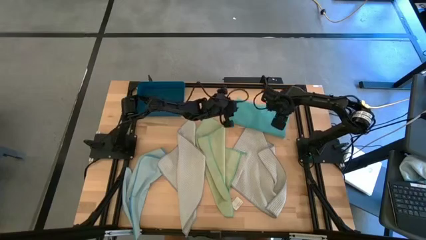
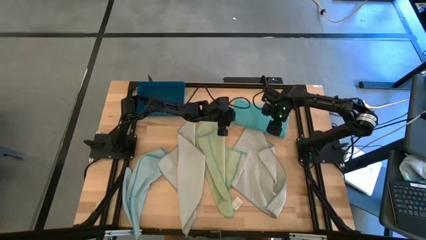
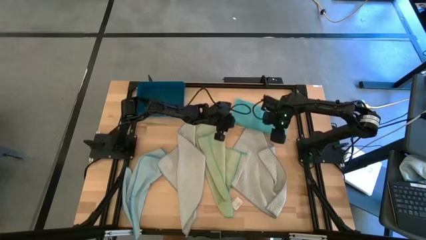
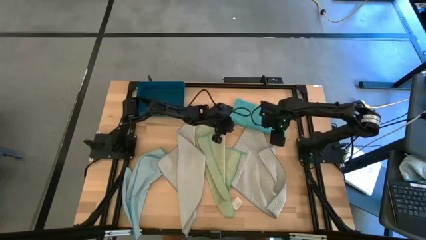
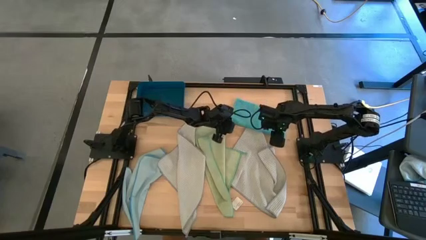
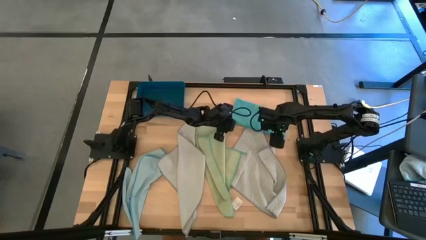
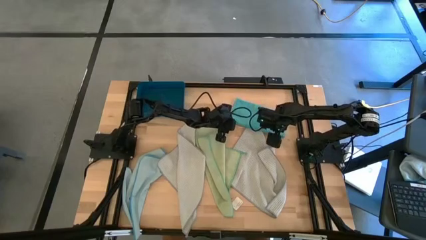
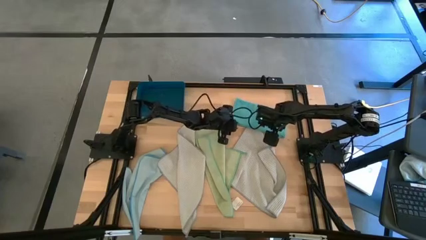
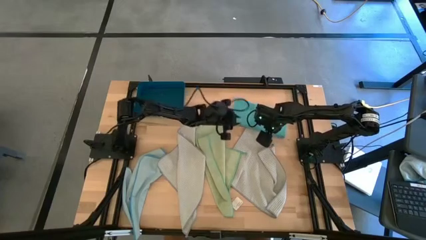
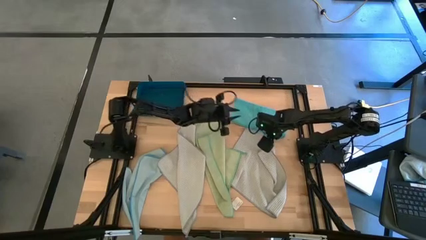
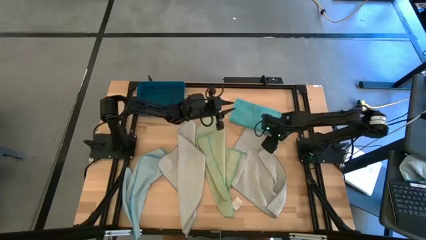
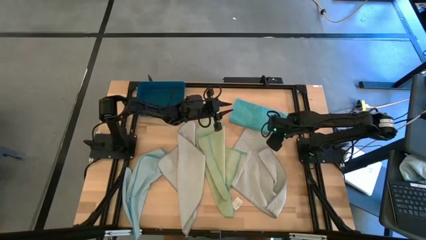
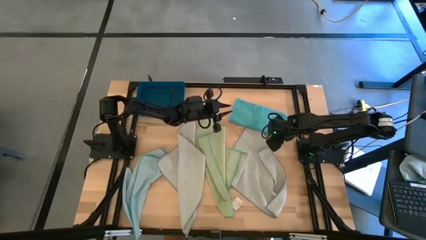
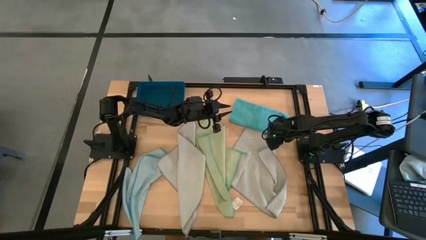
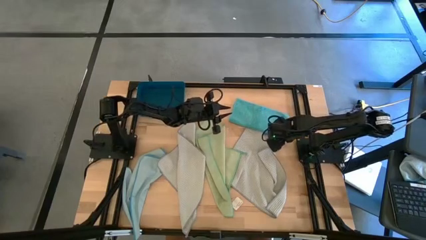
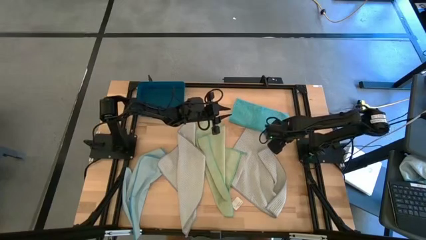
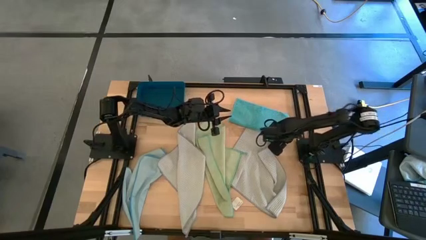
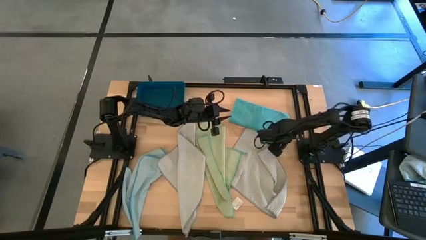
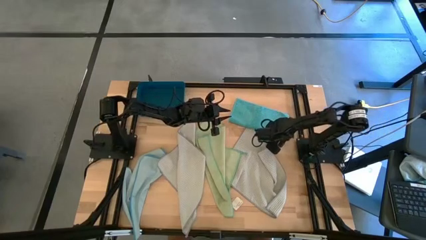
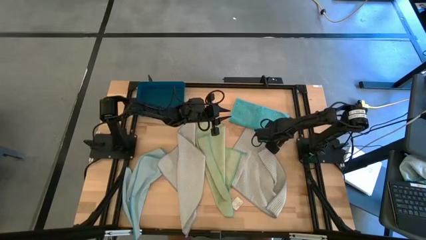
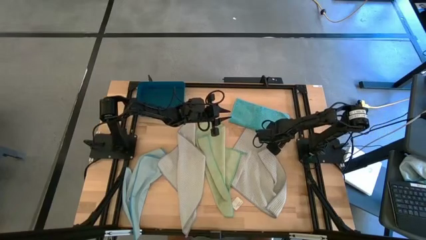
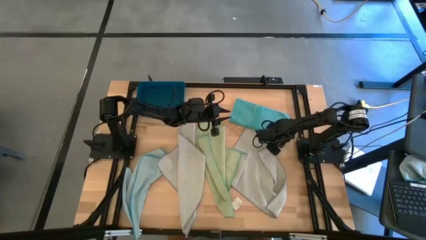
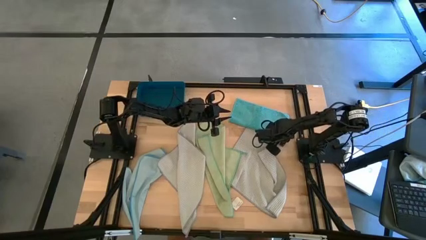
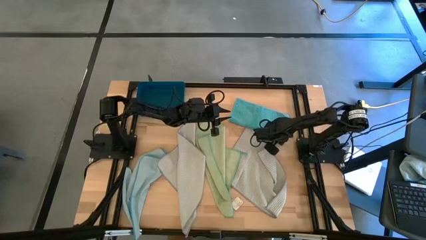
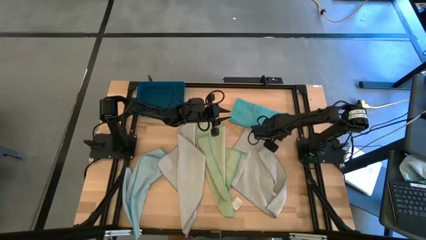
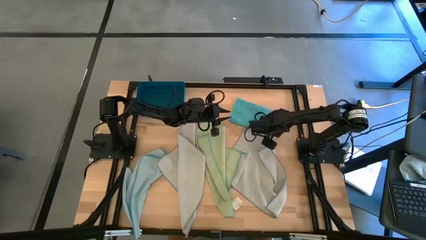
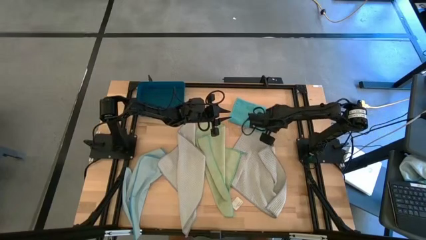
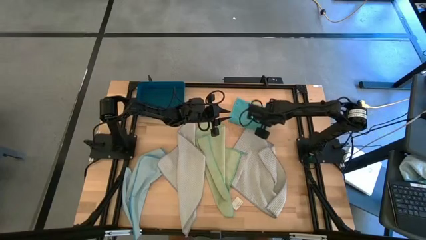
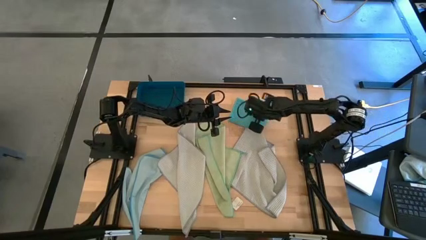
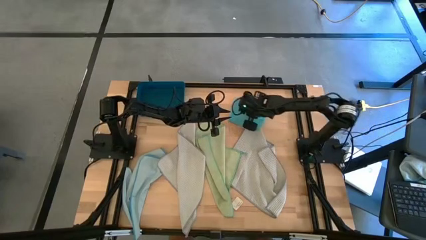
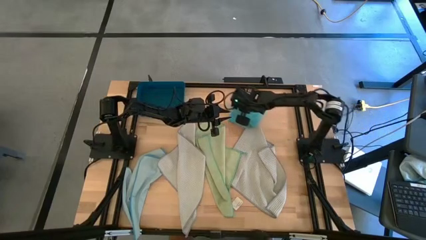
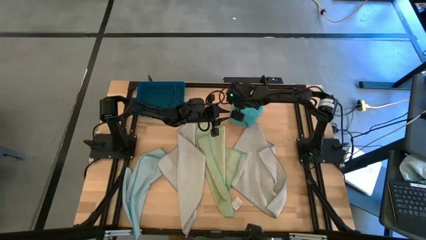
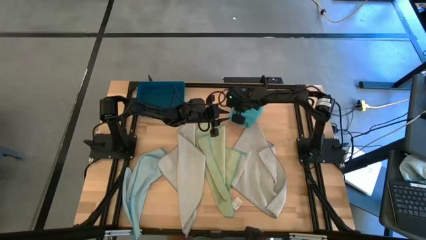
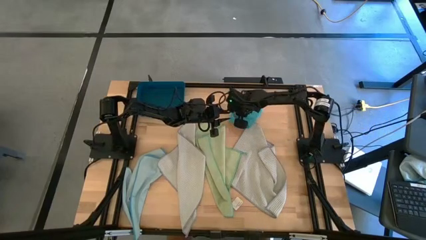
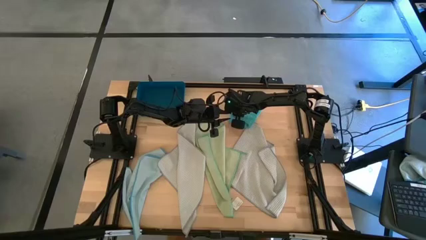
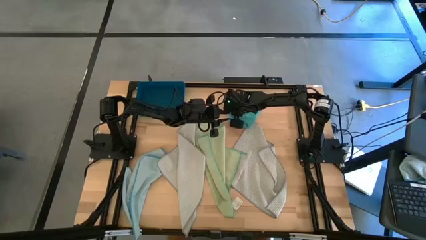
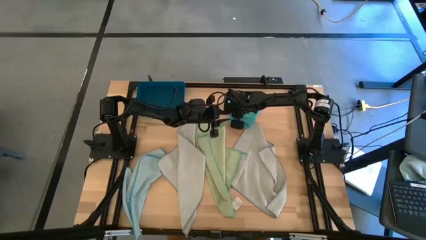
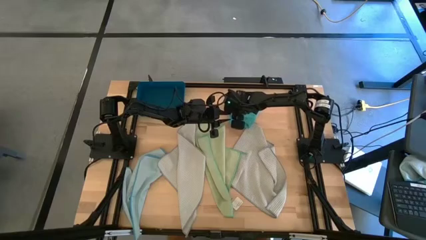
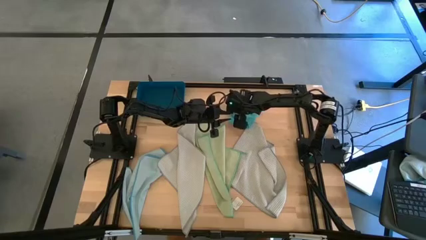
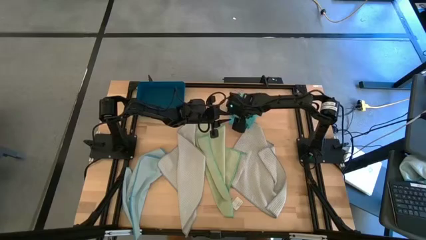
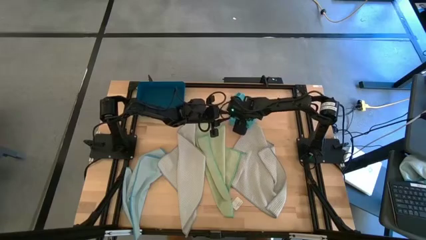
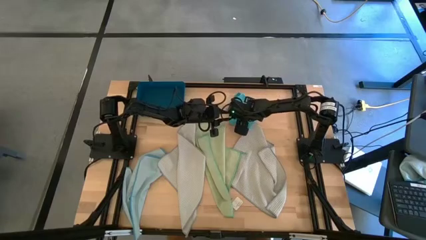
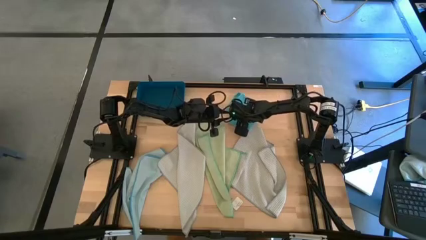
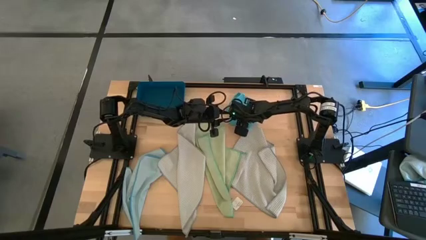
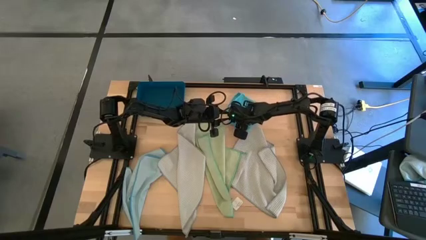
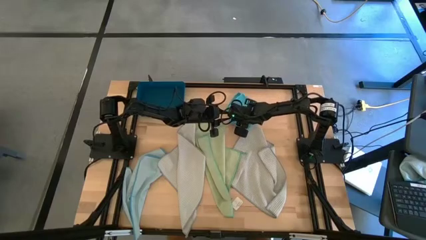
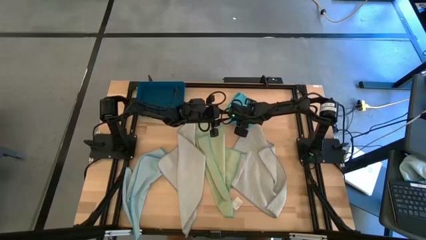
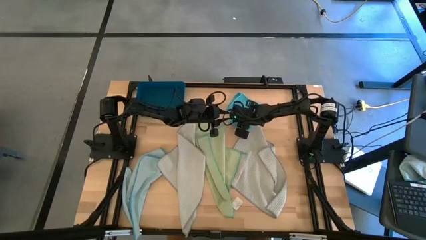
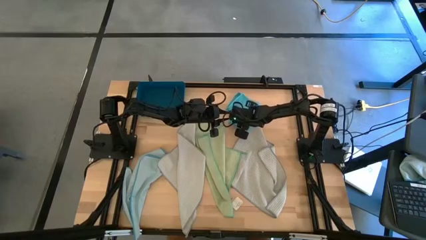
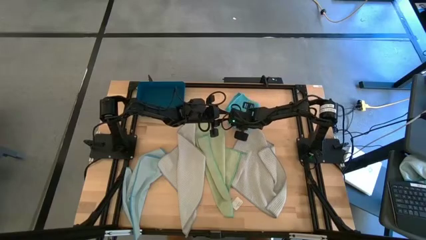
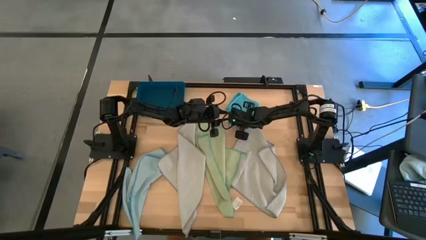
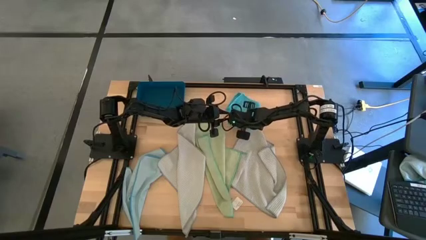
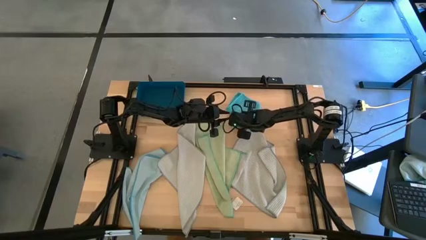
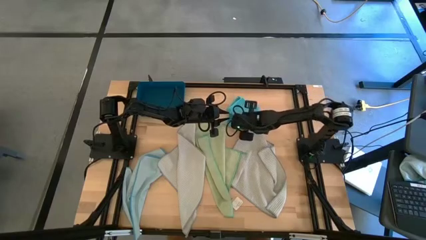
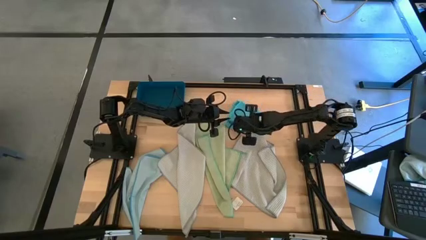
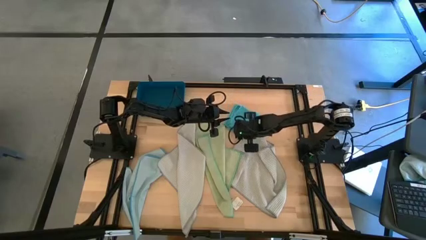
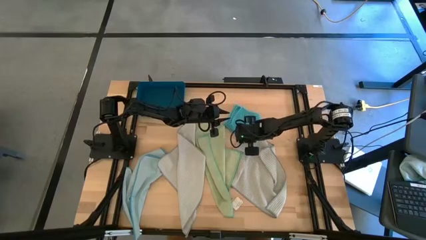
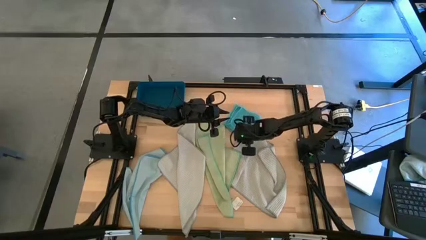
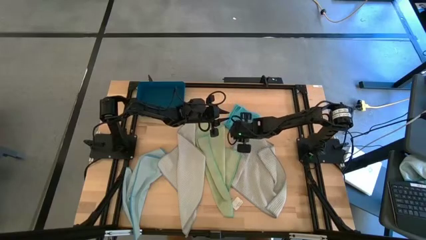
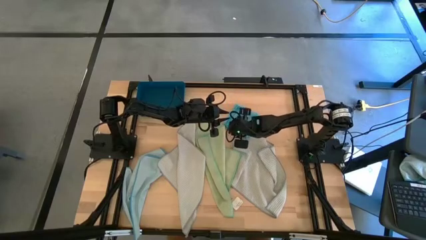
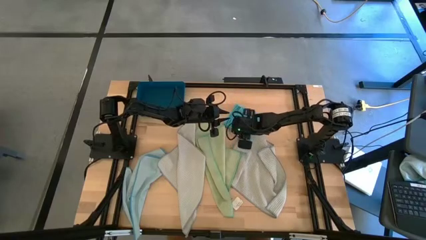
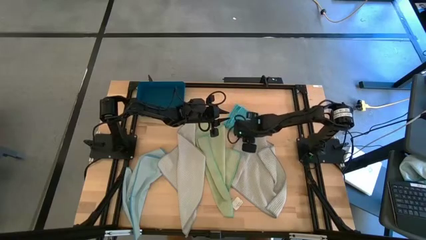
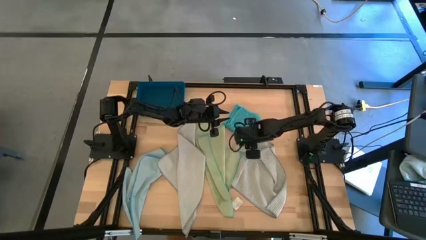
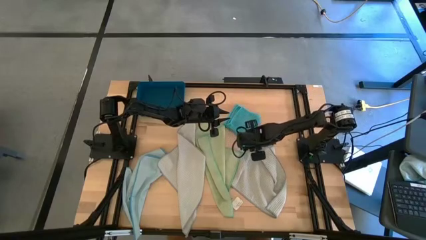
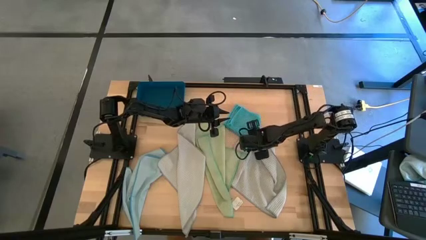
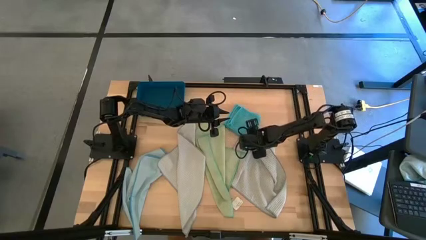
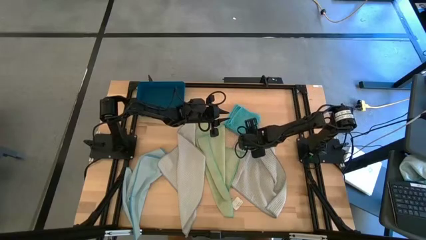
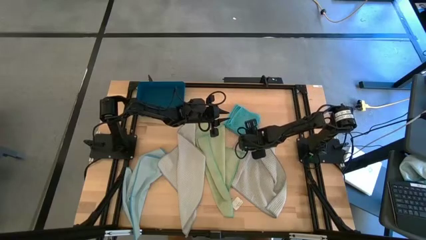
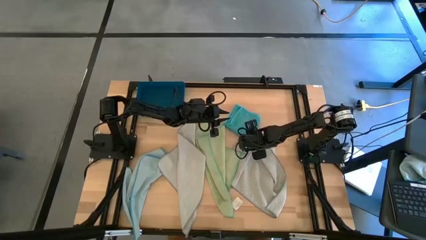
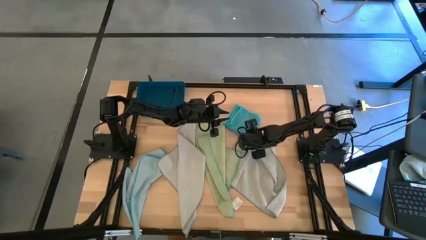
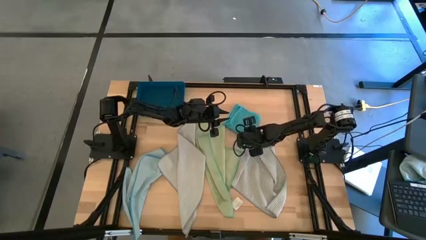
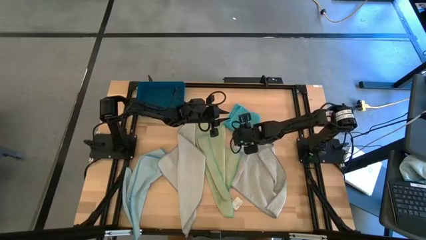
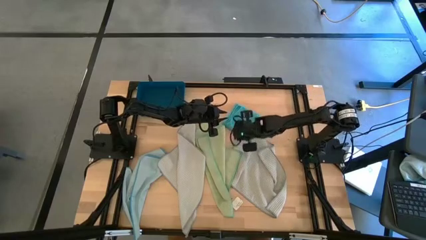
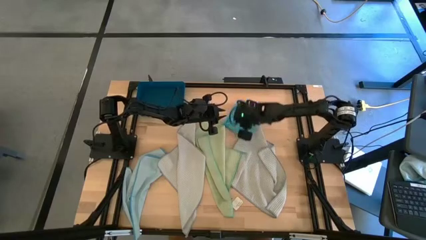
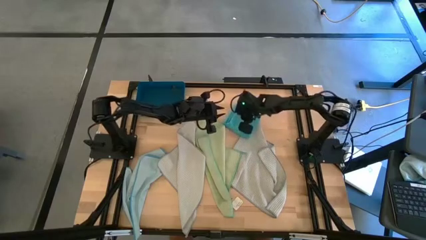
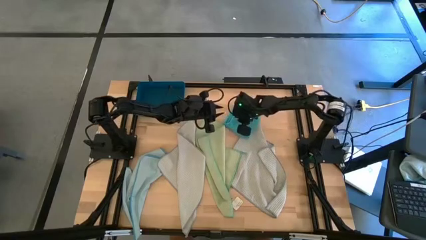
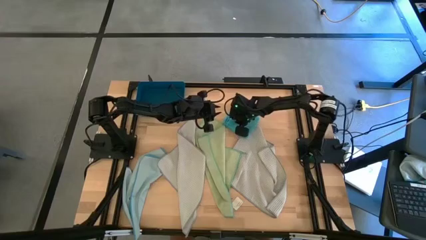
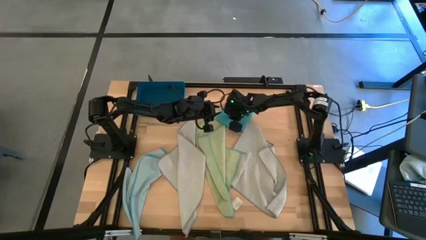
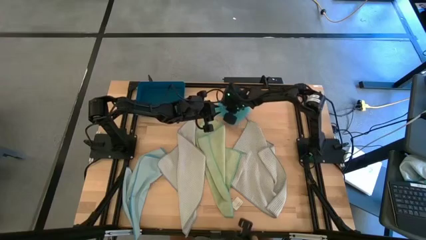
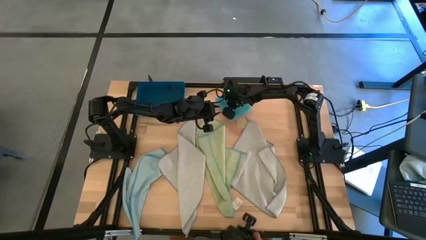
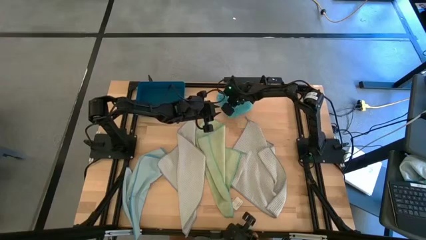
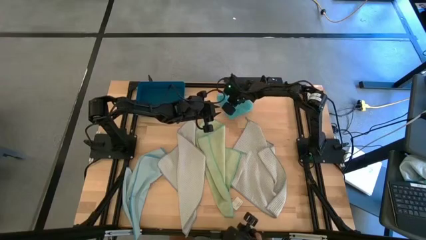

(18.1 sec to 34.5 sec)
Task: Fold microfiber towels
Fold the blue towel
